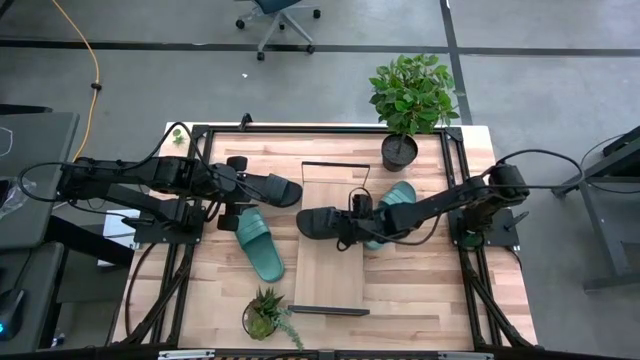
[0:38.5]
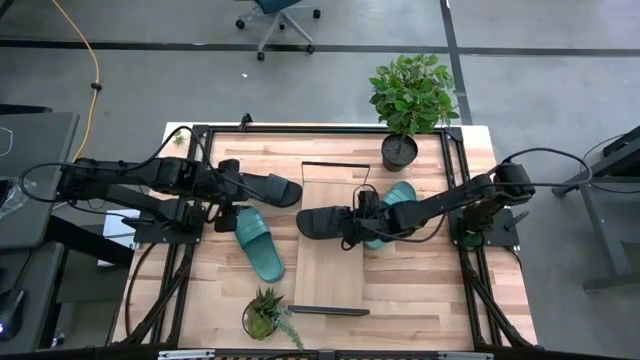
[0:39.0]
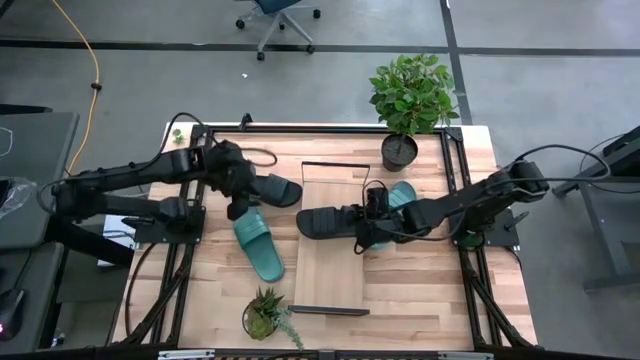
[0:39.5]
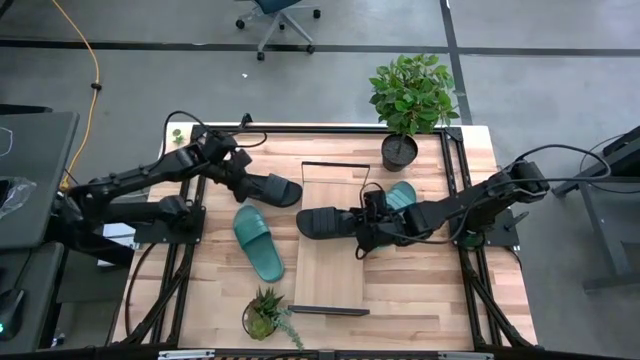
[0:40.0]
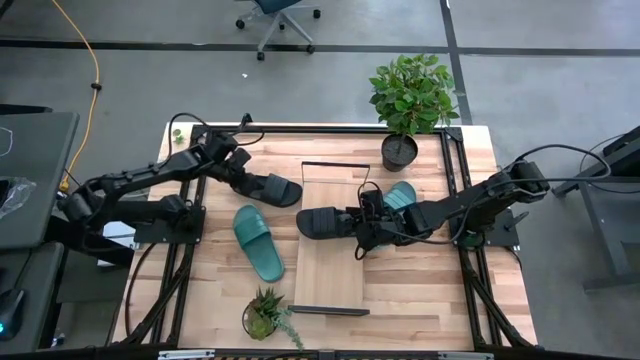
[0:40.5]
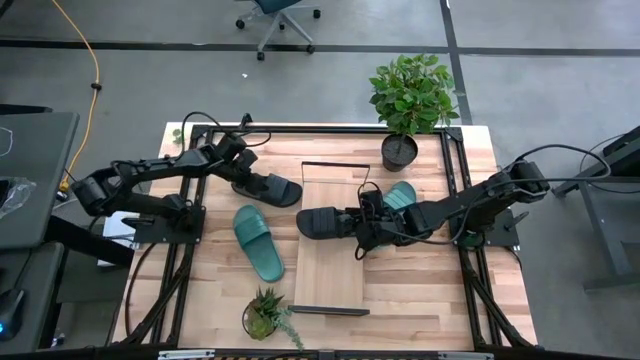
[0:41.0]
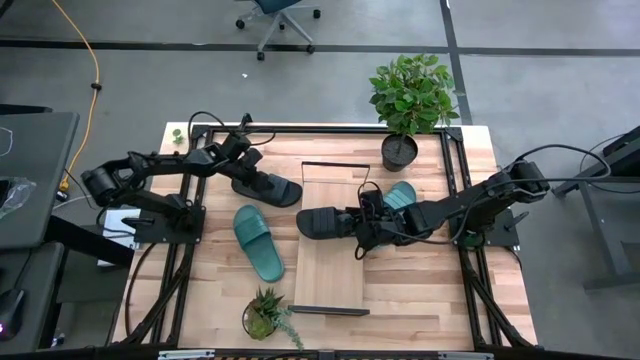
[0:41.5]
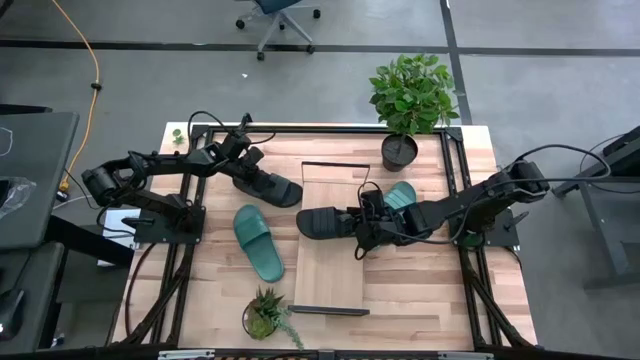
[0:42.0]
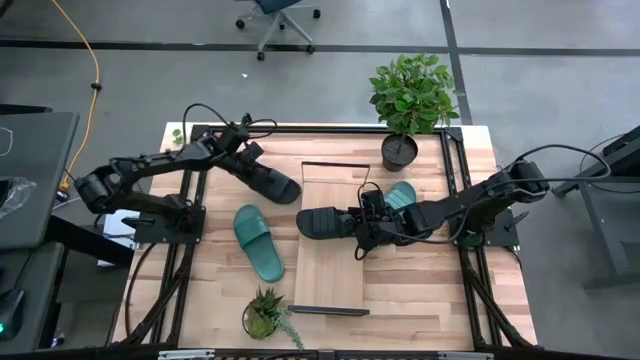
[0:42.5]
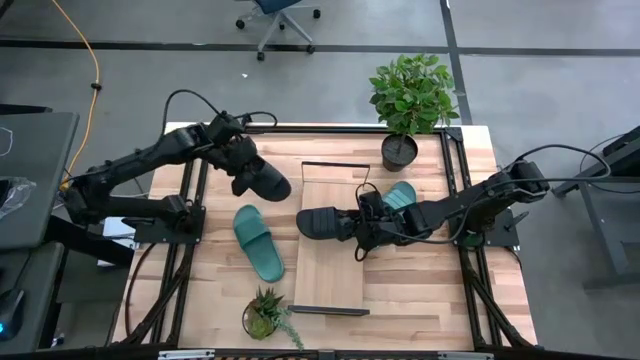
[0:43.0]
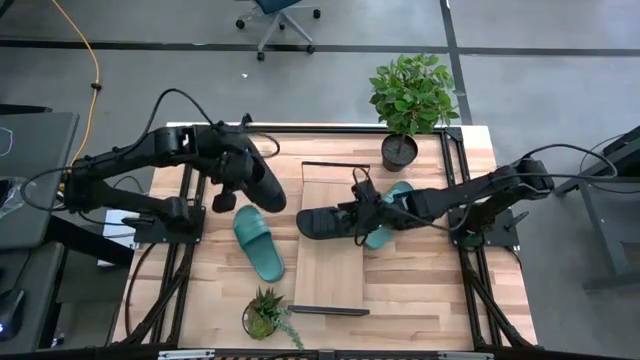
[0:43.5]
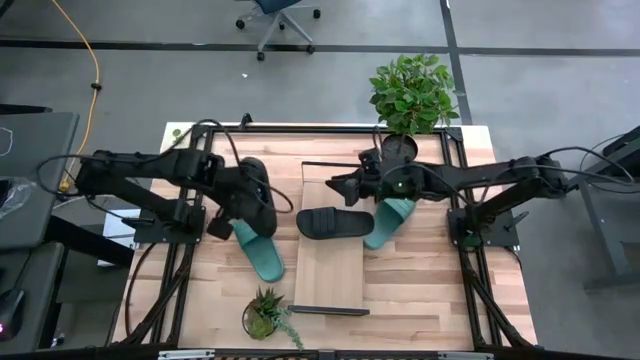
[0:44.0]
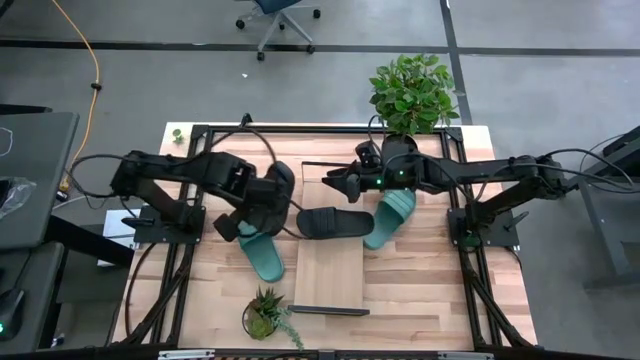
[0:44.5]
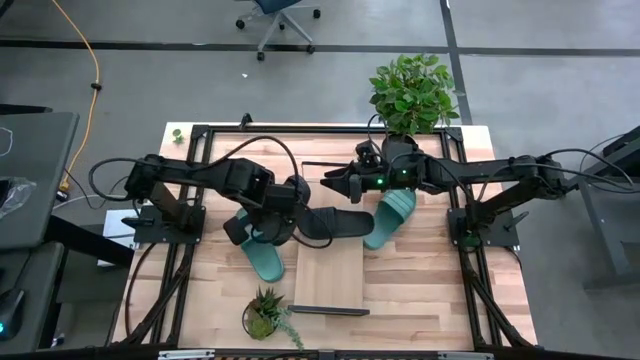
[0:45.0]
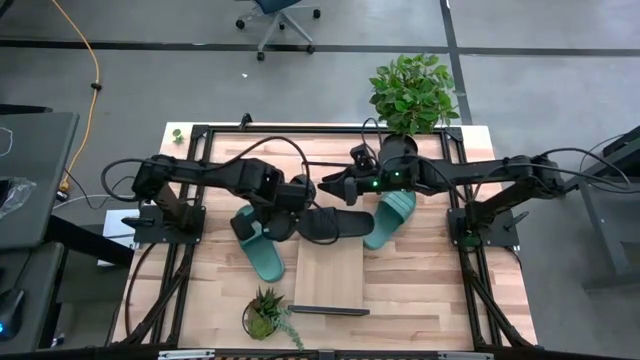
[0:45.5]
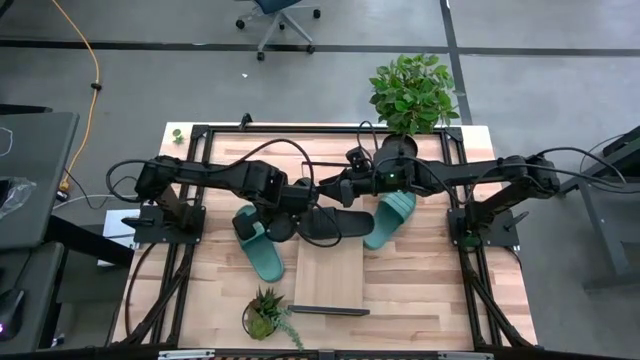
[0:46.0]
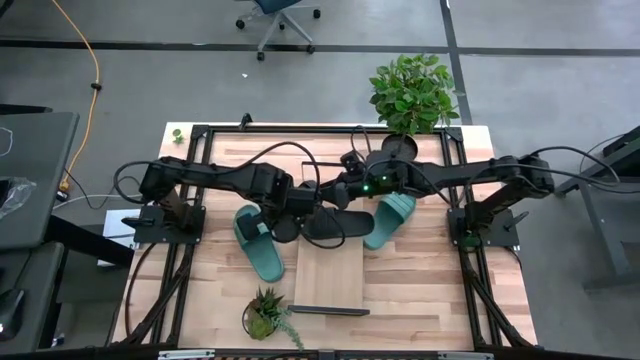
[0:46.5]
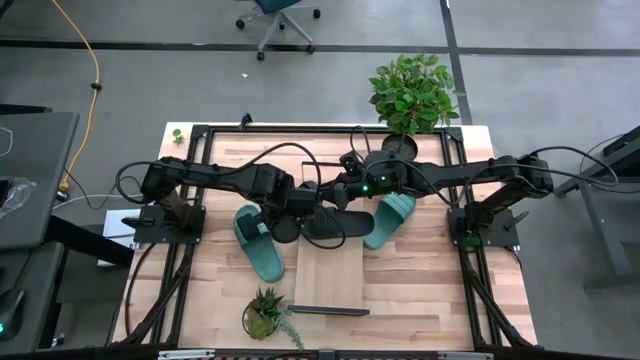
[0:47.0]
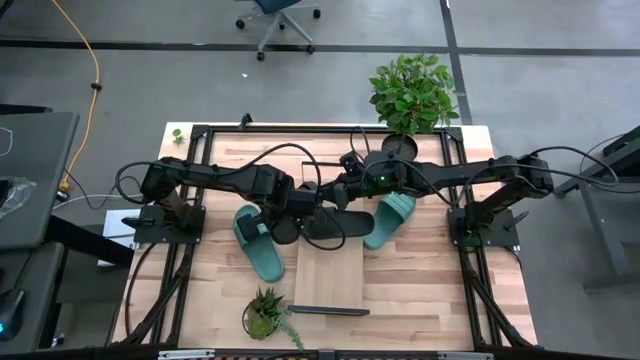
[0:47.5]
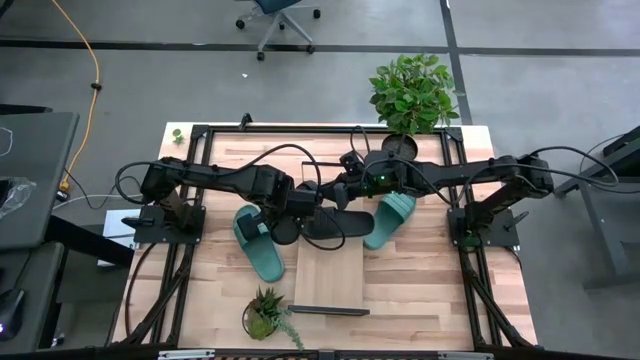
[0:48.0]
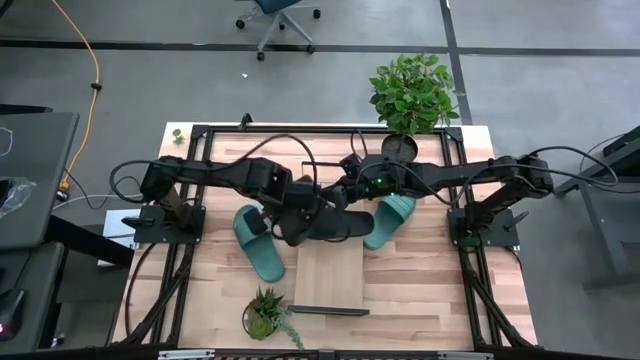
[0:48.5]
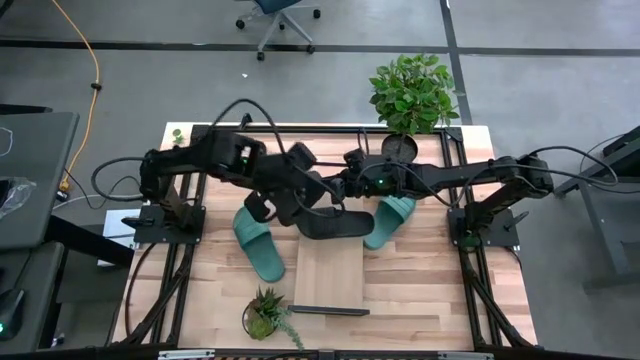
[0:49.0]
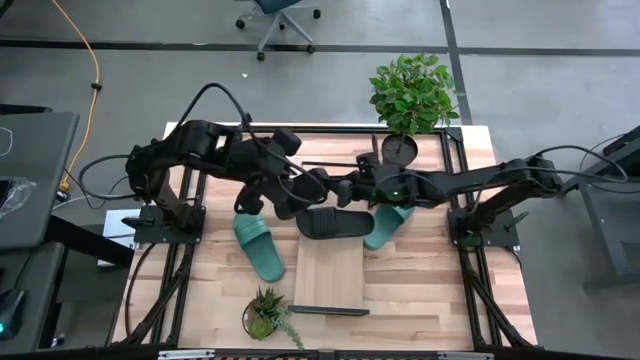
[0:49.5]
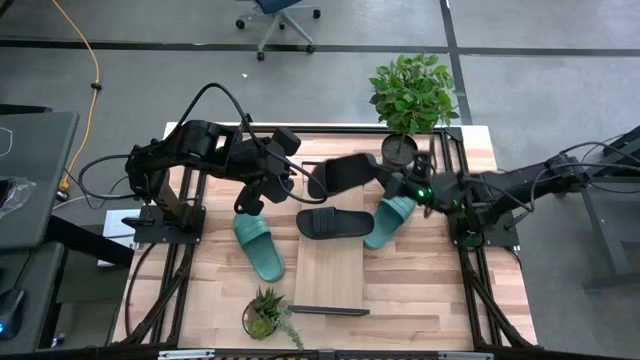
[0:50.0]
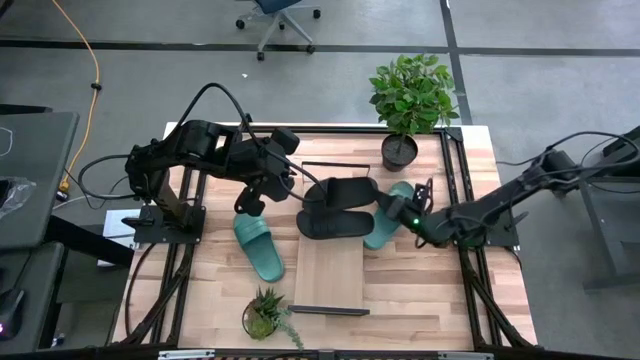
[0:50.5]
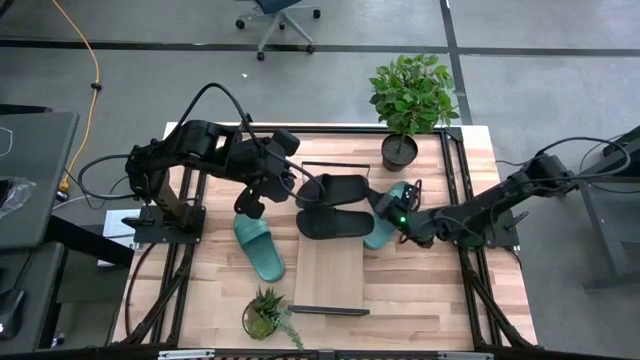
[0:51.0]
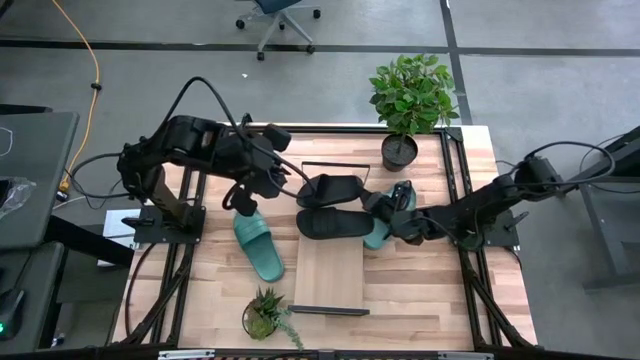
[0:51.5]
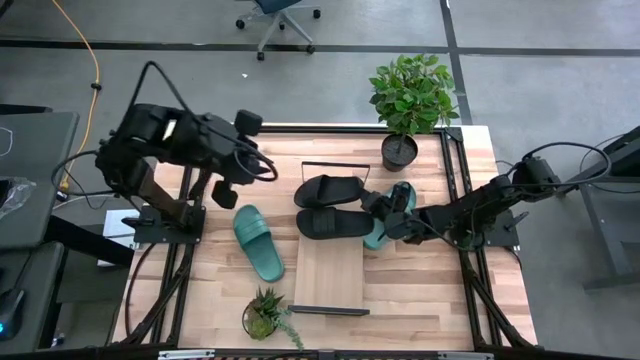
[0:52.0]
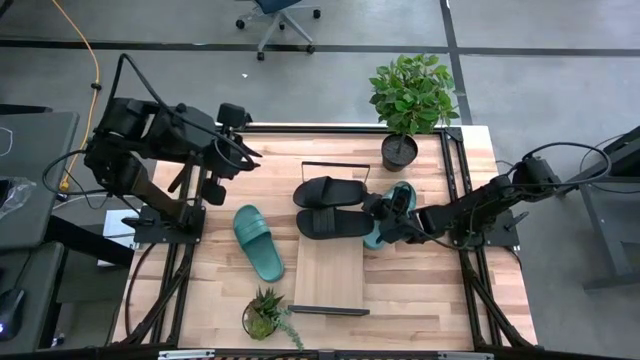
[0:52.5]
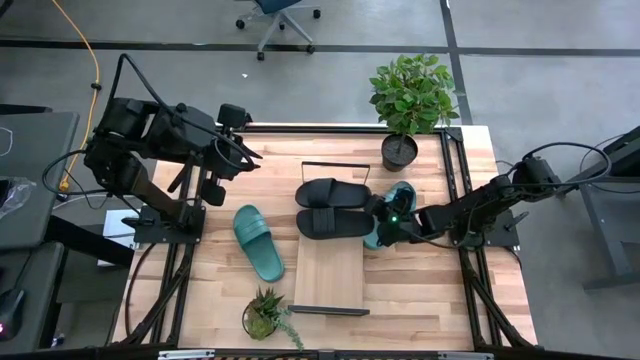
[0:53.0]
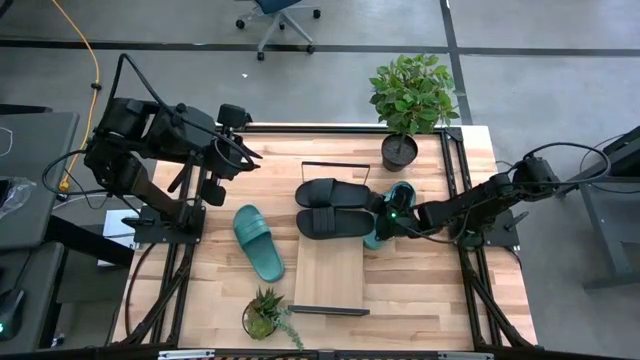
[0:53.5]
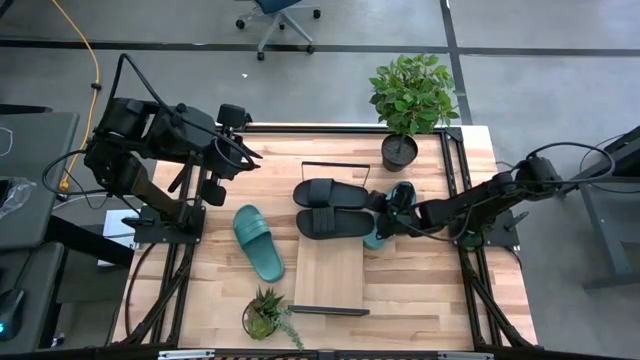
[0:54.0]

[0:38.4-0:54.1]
Task: Pick and place slides into the shelf
Put the black slides on the shelf

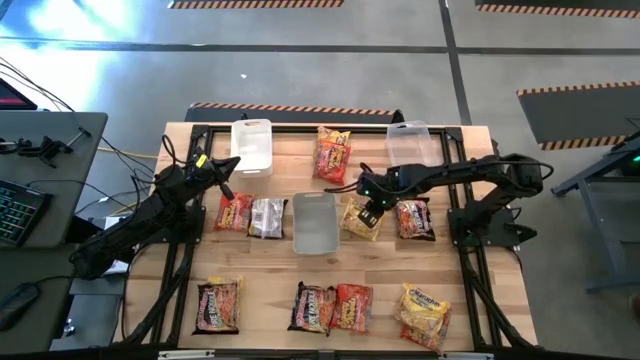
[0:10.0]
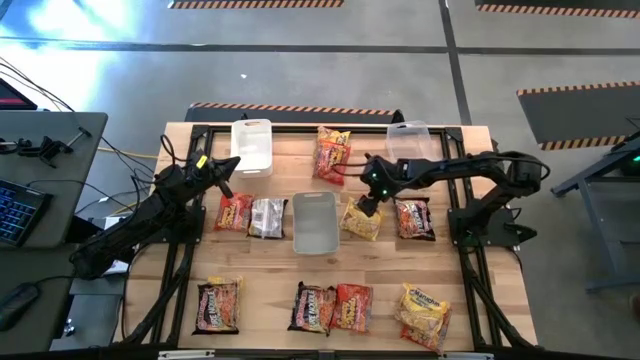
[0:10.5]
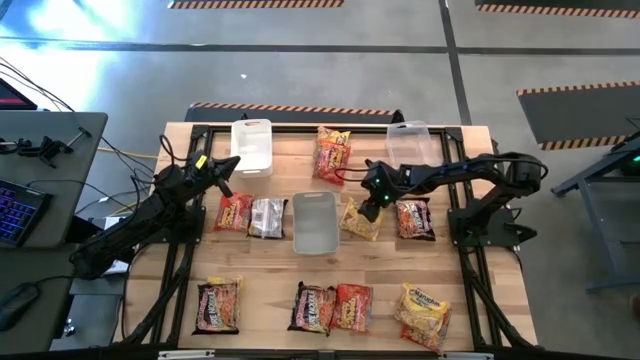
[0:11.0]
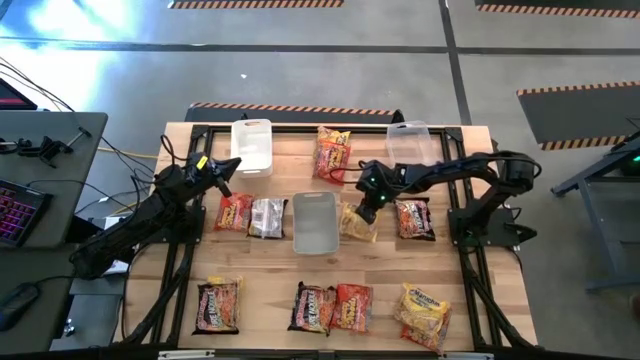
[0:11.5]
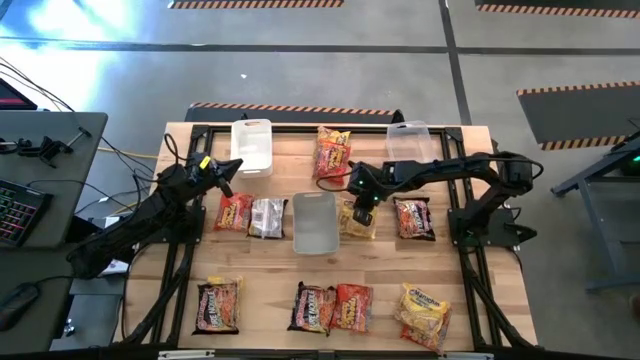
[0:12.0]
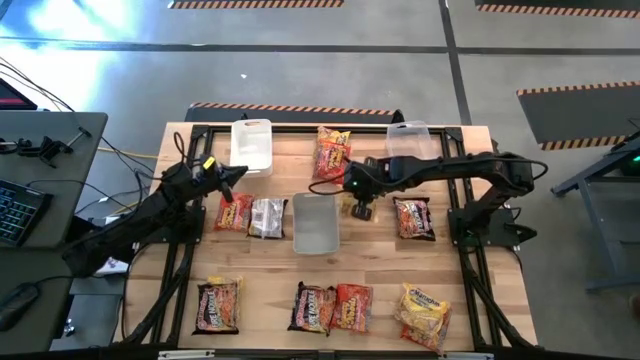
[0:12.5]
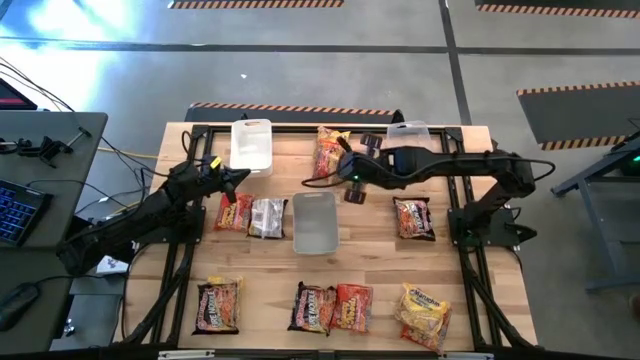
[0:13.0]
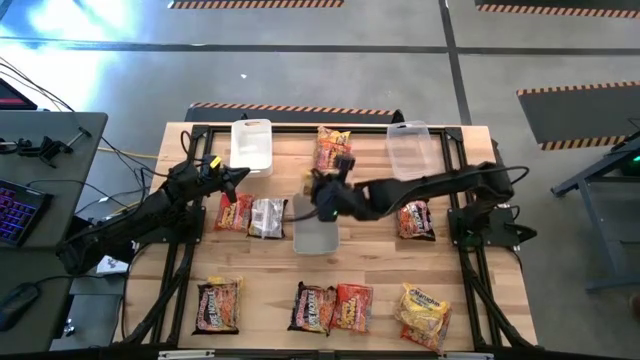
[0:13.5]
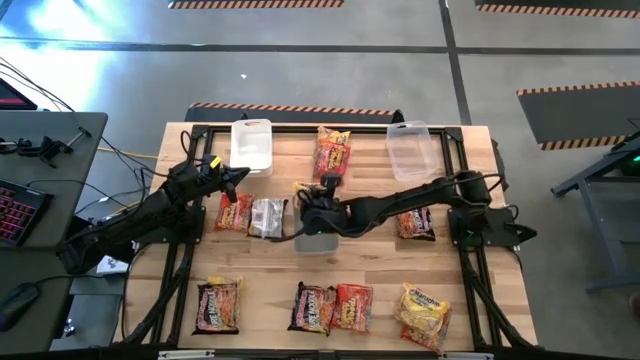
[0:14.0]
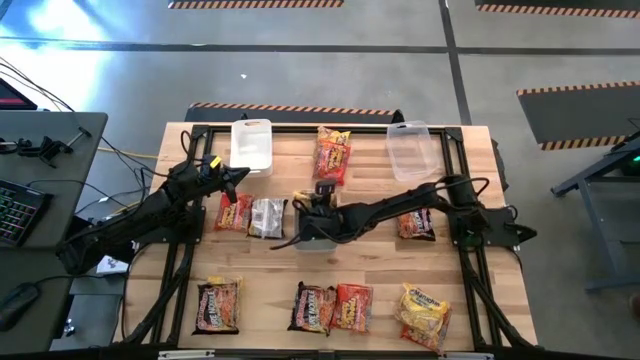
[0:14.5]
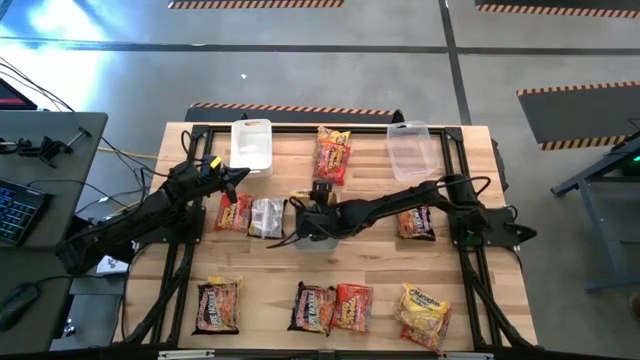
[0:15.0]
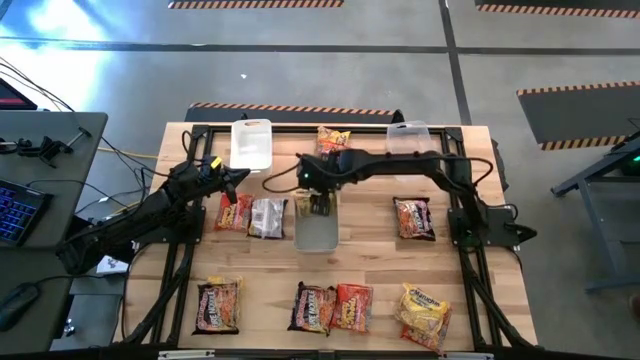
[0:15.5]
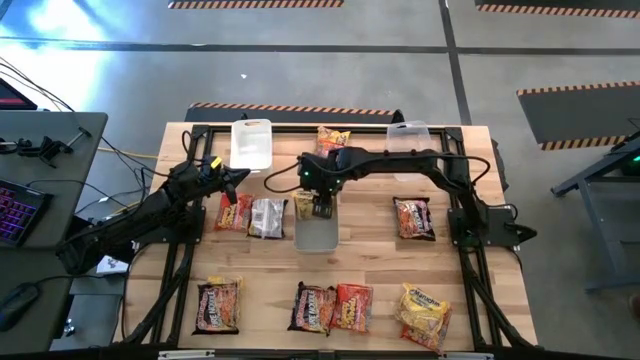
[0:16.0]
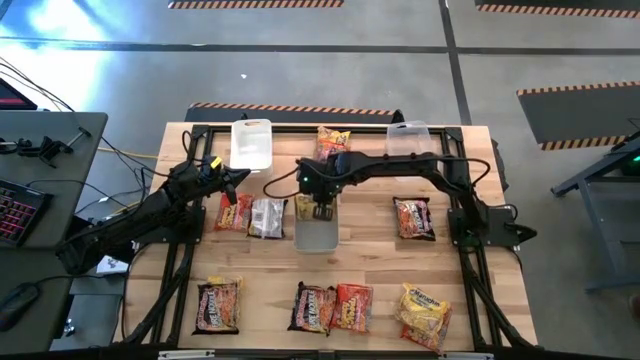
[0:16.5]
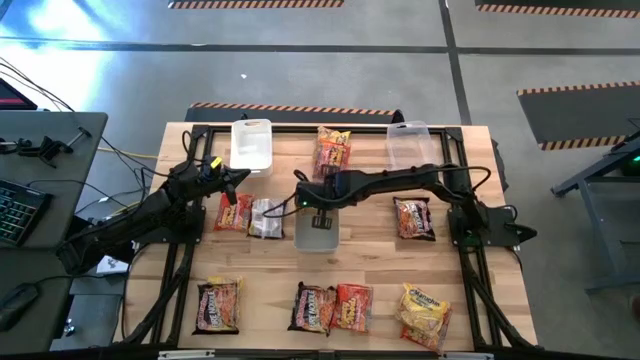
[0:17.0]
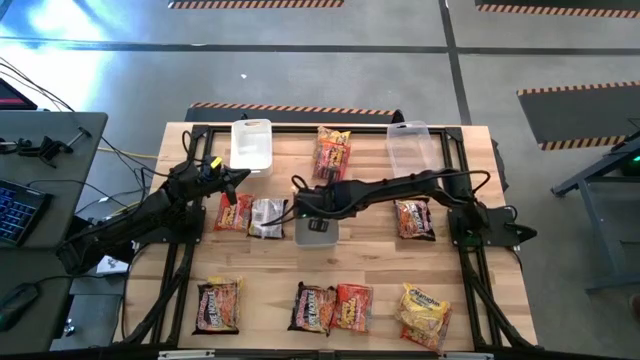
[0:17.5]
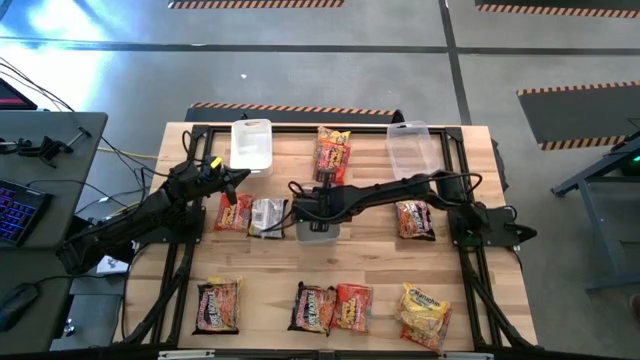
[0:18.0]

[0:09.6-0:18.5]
Task: Sort Maruchan noodles
Put the yellow noodle pack into the gray bin
